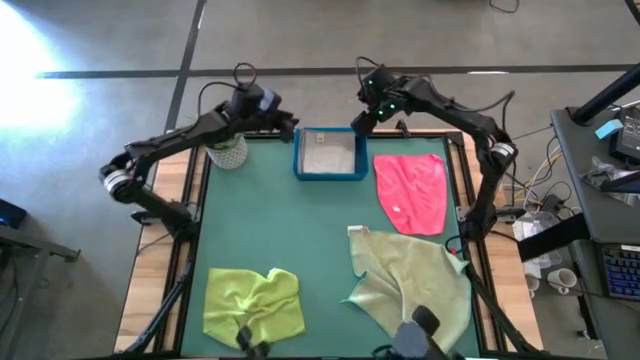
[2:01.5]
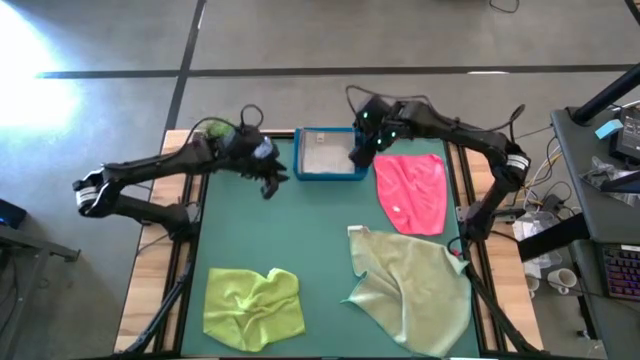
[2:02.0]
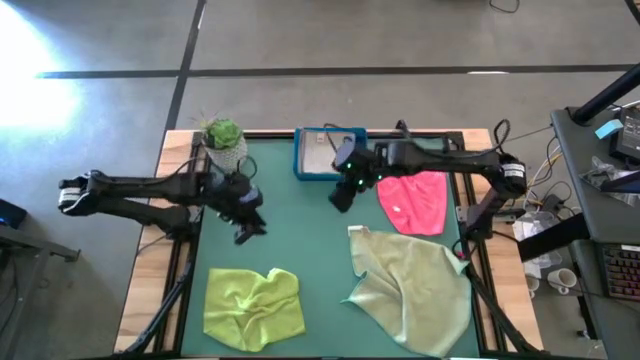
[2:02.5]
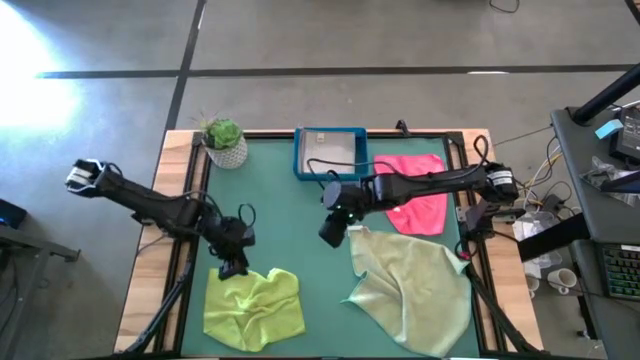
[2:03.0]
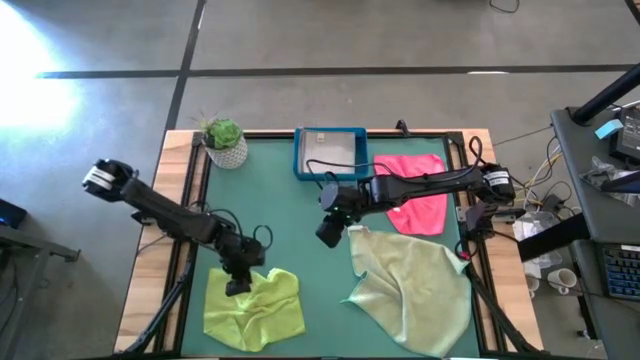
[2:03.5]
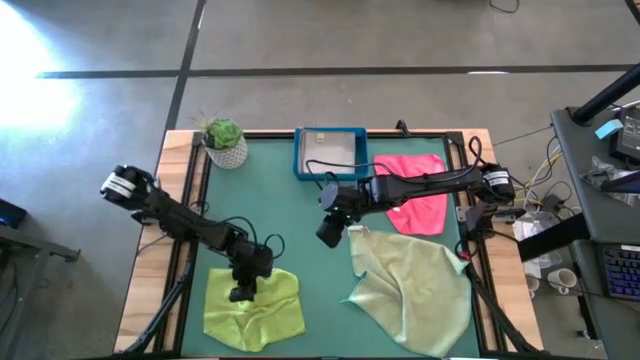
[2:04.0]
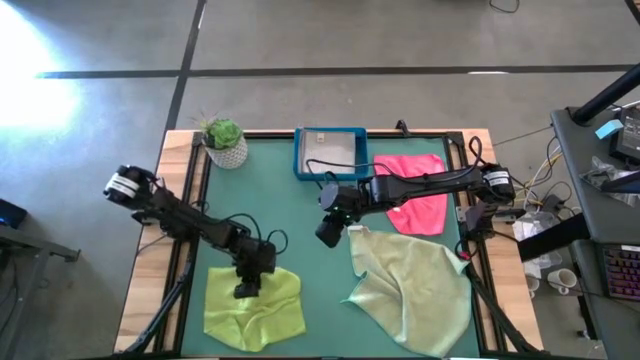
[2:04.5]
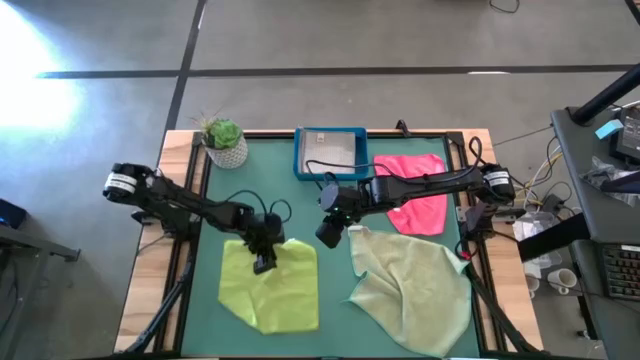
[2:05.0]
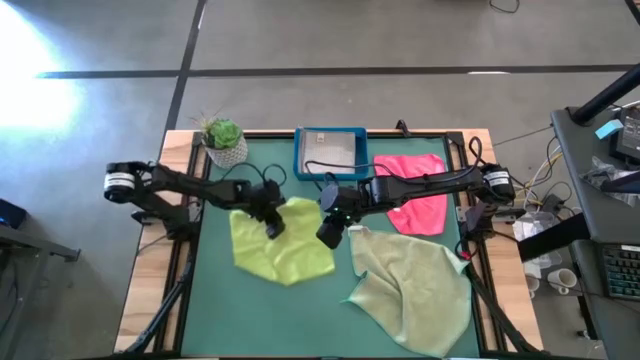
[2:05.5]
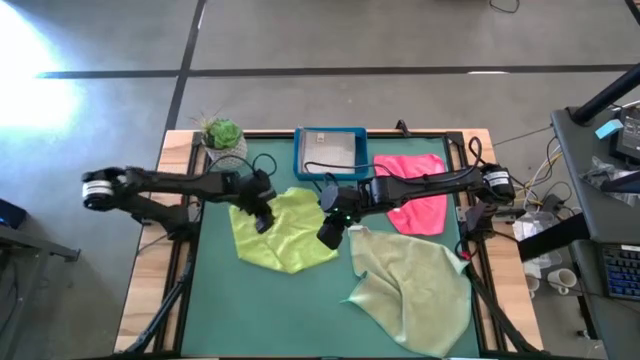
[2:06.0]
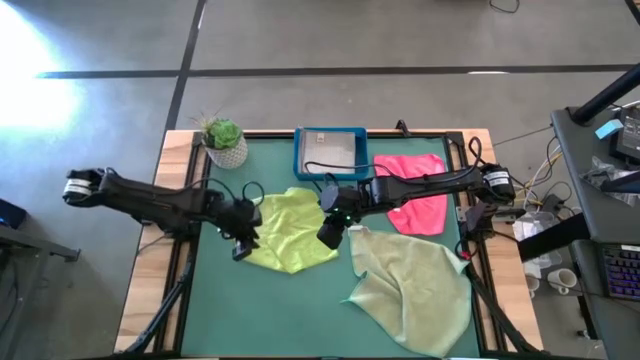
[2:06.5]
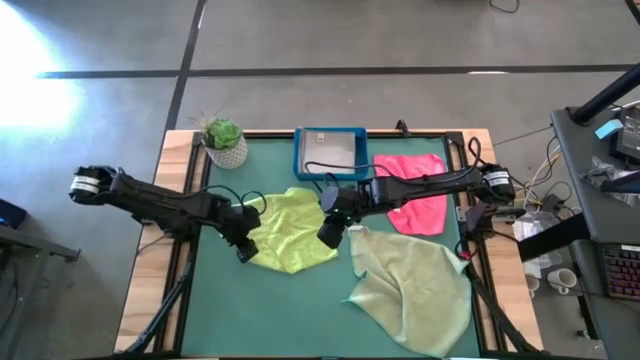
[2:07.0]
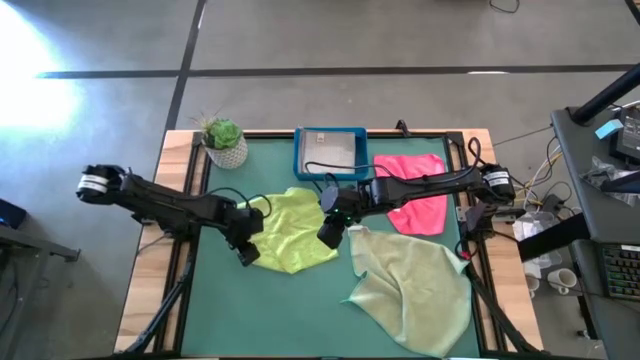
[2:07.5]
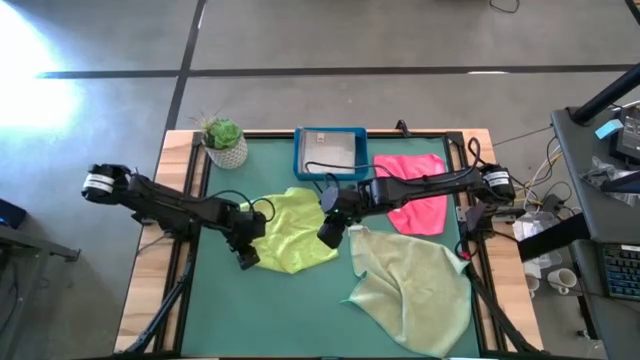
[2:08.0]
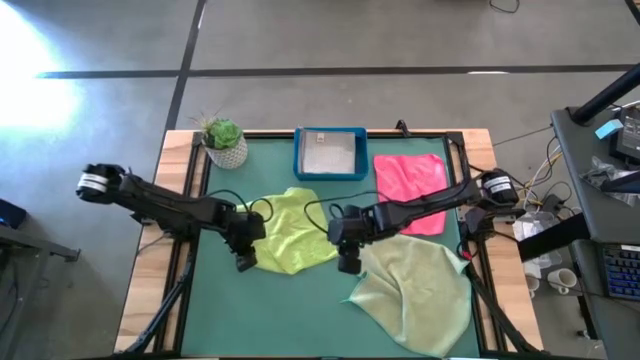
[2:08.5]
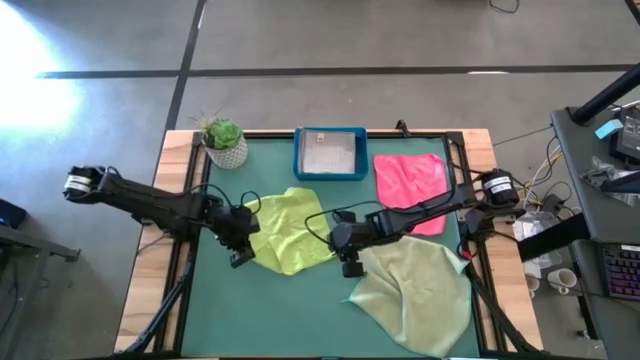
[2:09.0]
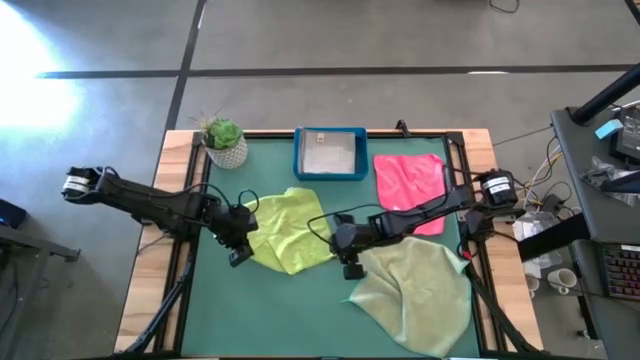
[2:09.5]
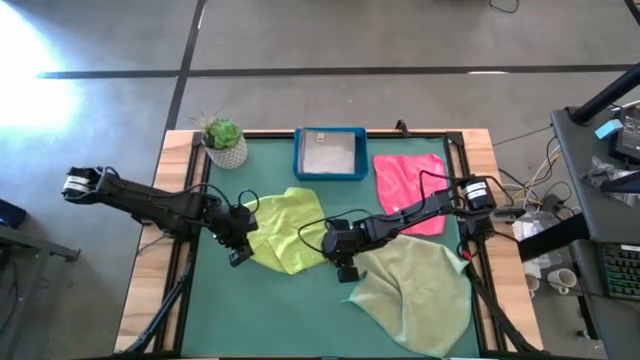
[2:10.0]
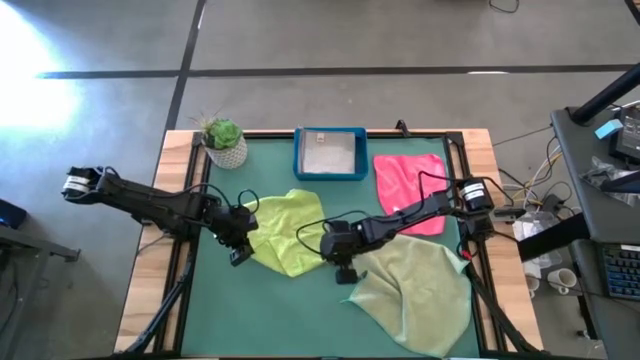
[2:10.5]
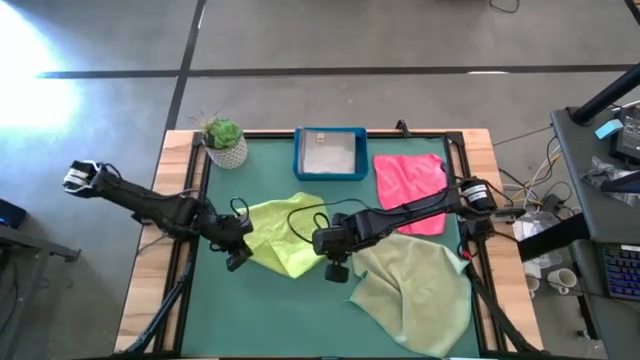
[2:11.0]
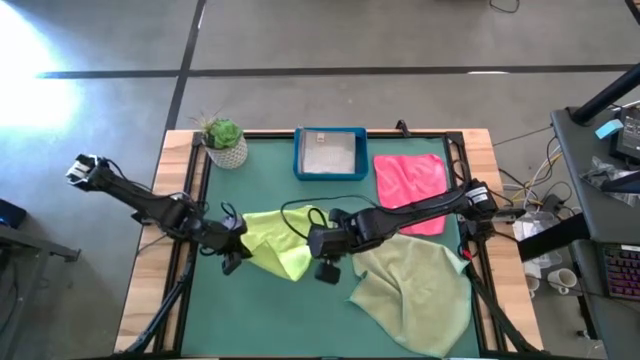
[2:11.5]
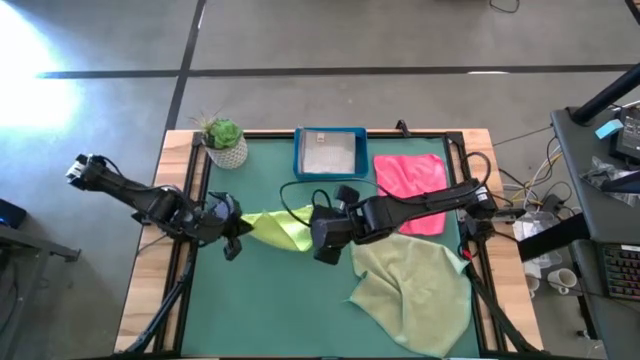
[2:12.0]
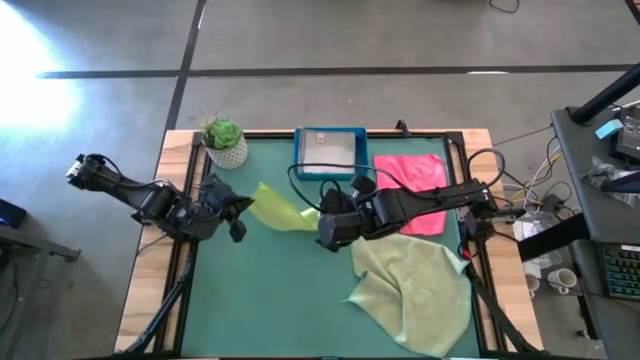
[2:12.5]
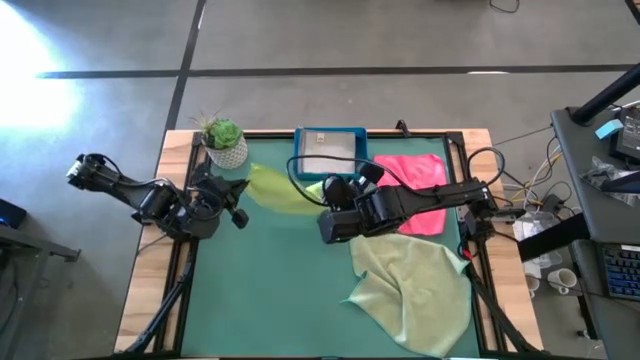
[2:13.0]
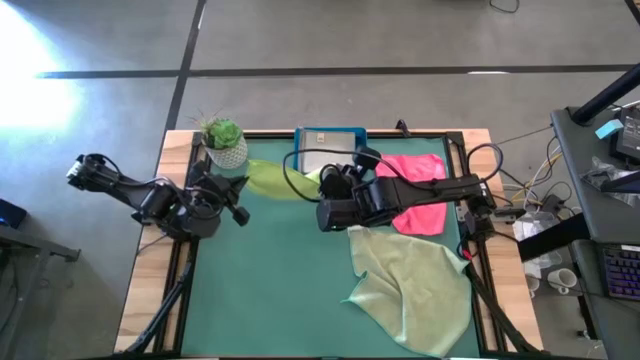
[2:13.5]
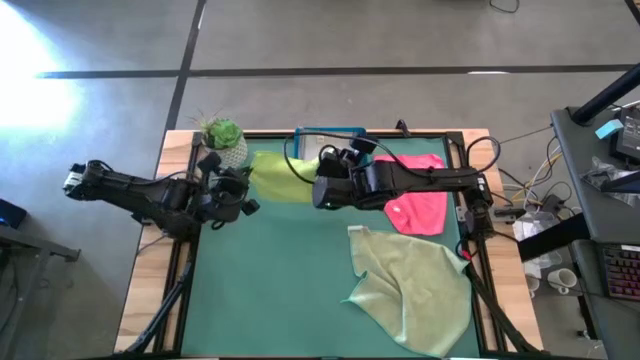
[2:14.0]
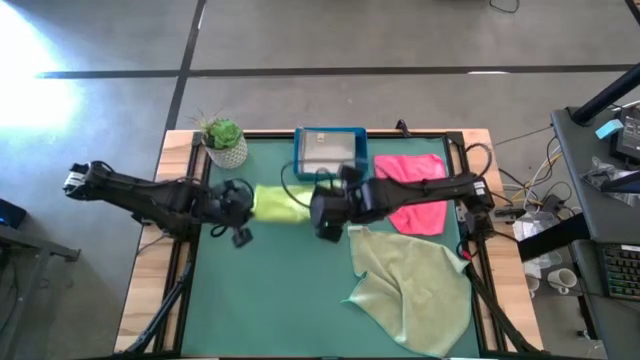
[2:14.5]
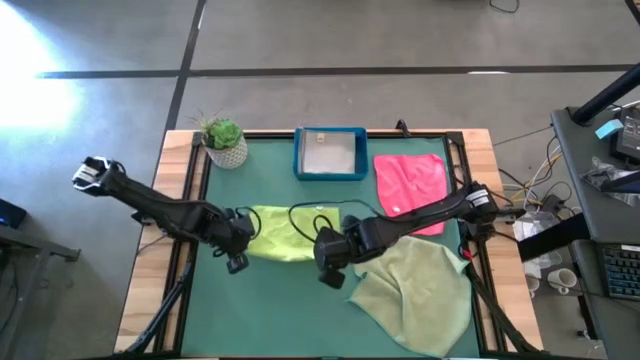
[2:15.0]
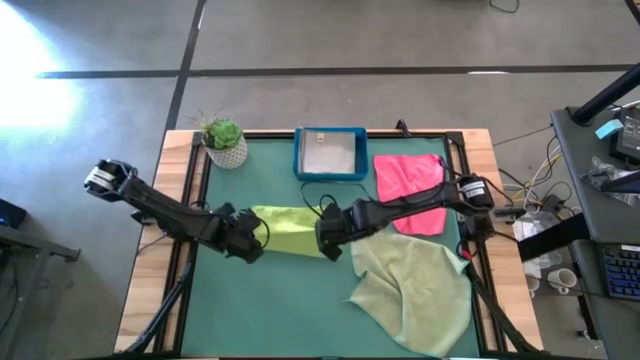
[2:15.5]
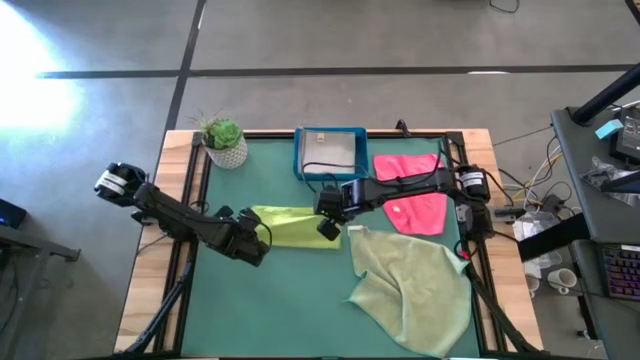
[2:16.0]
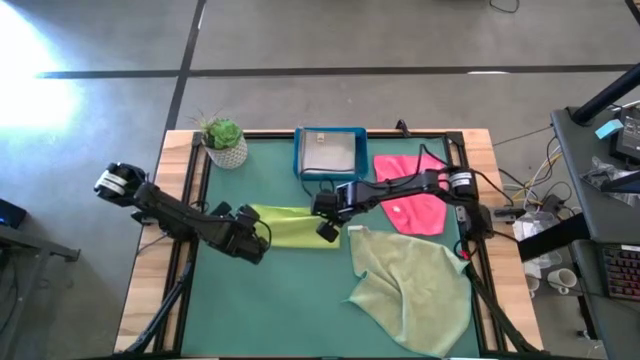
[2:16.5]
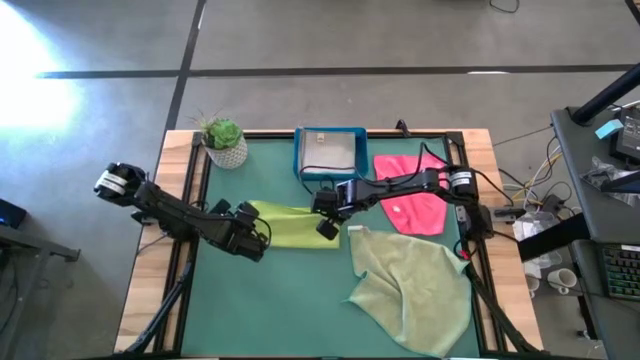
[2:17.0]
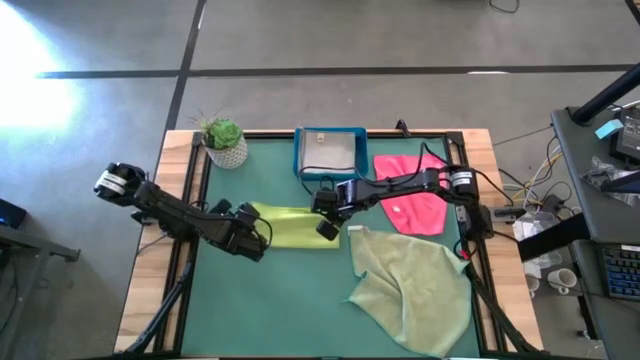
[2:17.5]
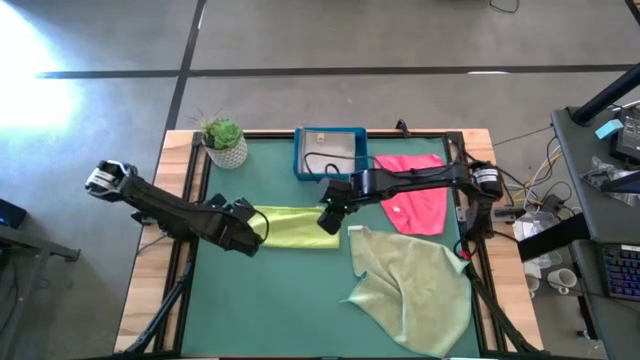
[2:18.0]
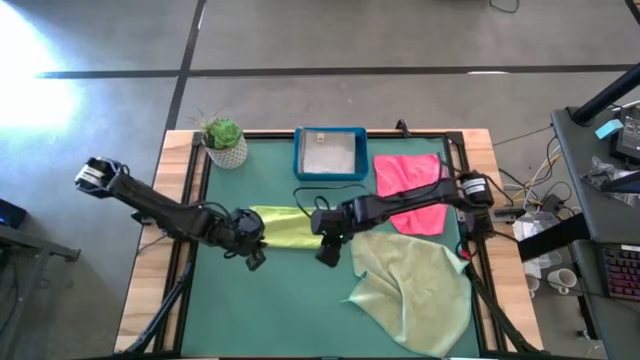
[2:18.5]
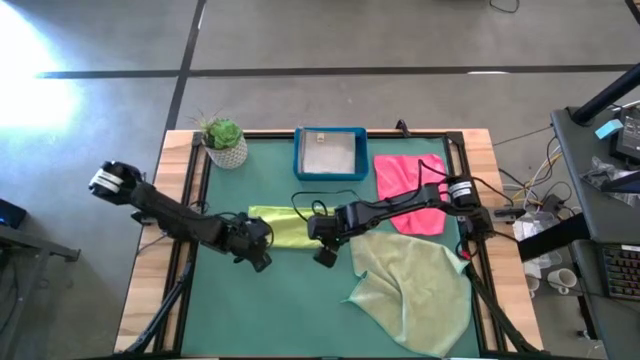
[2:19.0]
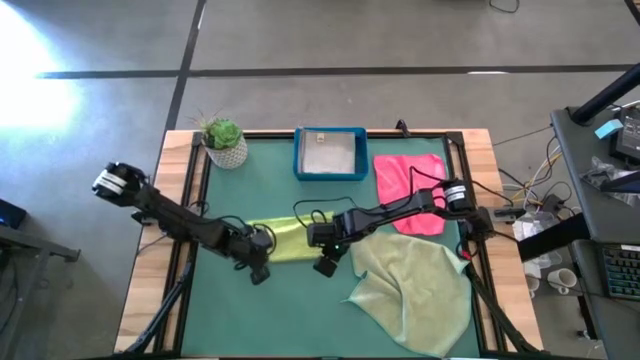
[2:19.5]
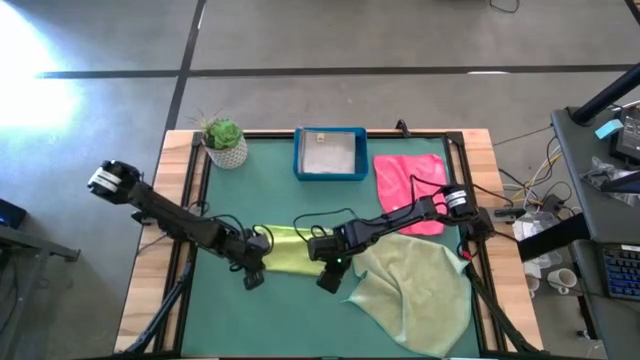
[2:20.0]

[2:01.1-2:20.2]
Task: Fold microfiber towels
Fold the green microfiber cloth

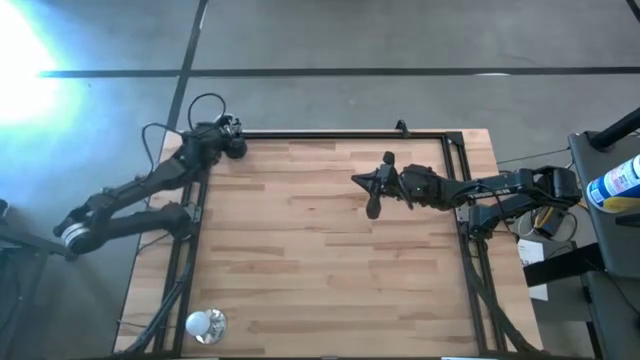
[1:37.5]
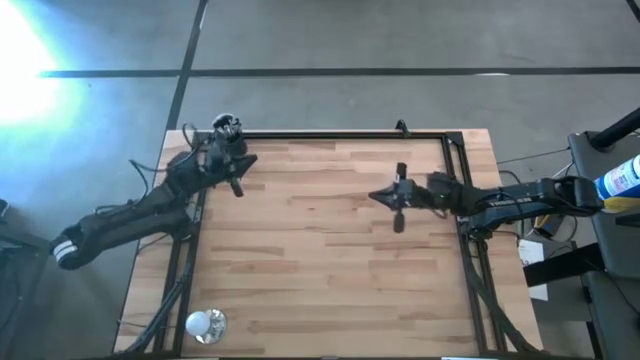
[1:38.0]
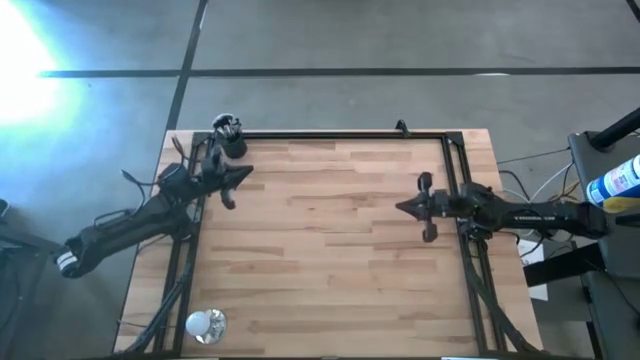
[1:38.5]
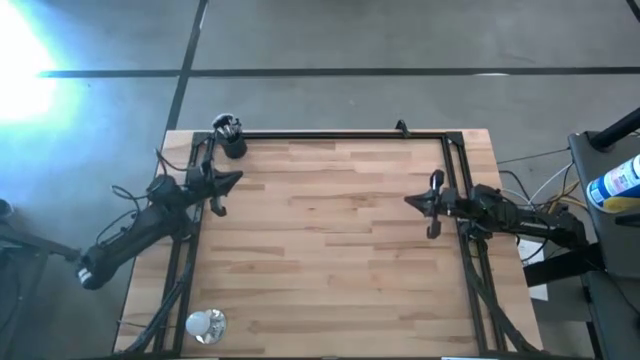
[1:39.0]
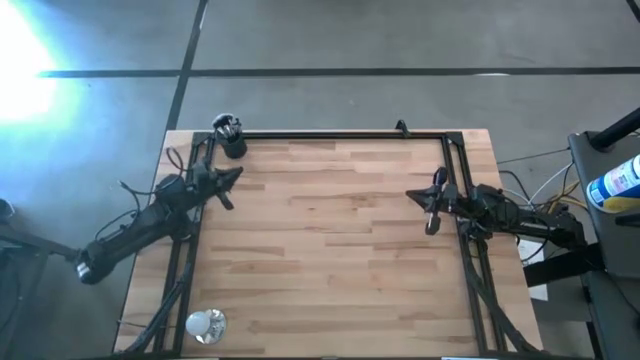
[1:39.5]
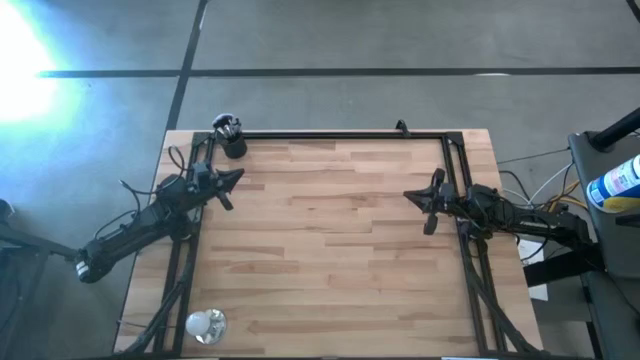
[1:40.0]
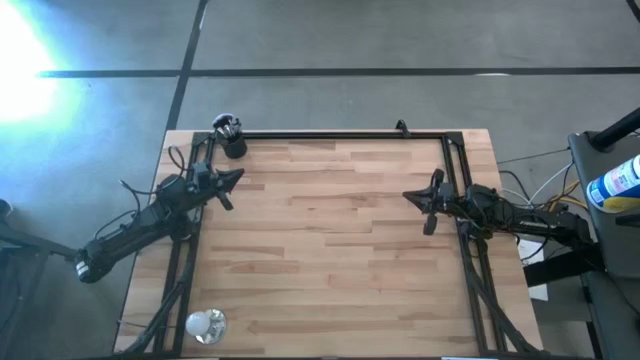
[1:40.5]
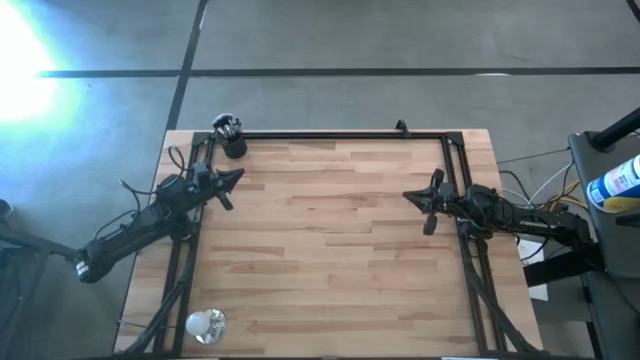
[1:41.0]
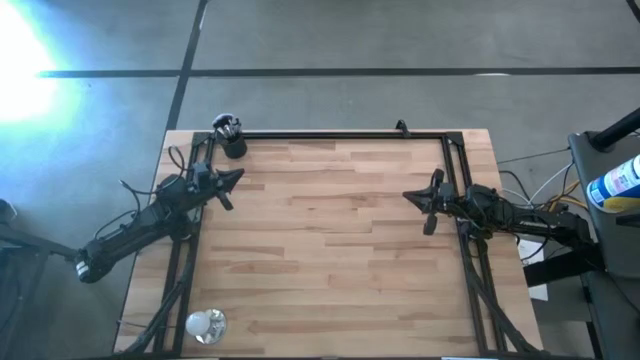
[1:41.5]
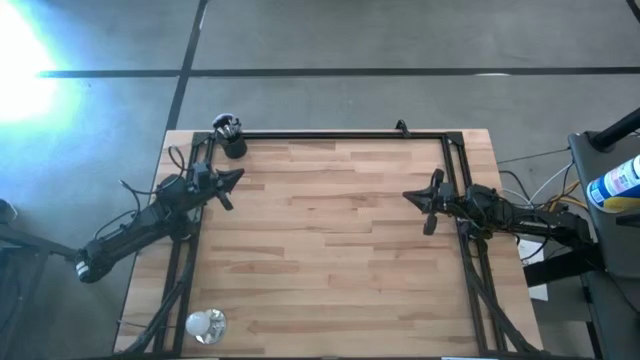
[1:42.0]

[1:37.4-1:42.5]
Task: Put items in baskets/containers
Return to Home Position
